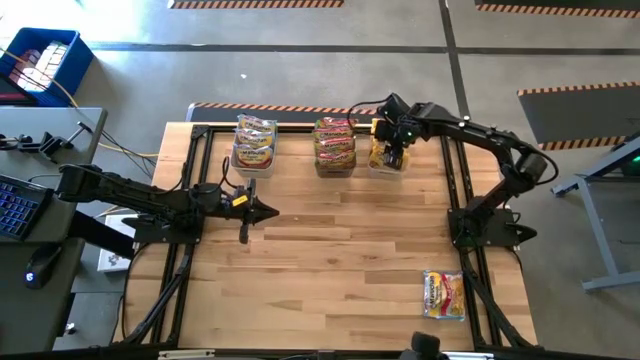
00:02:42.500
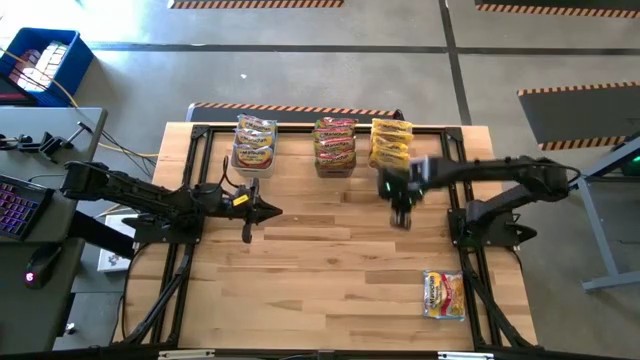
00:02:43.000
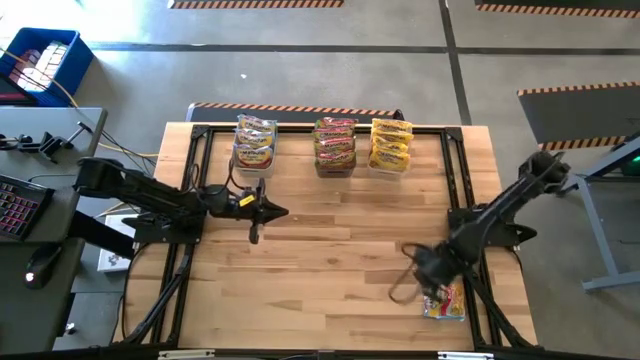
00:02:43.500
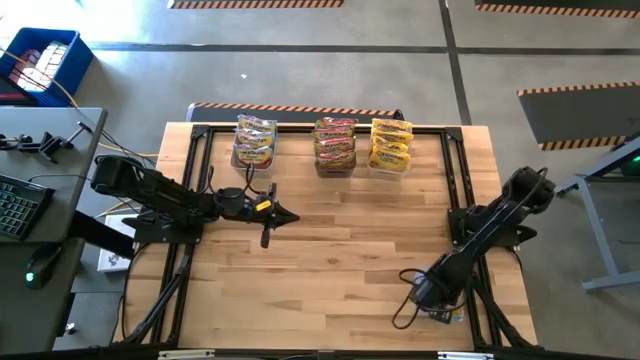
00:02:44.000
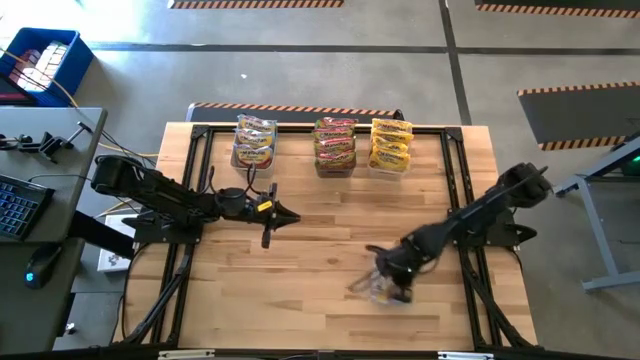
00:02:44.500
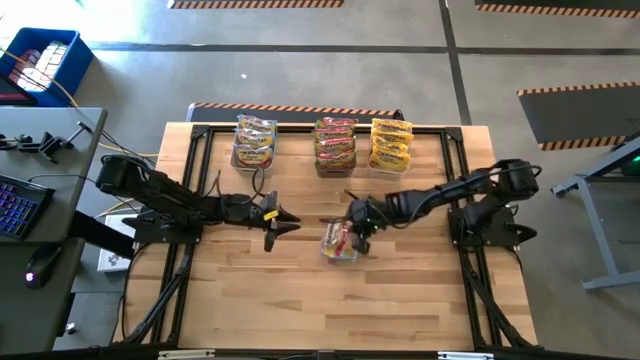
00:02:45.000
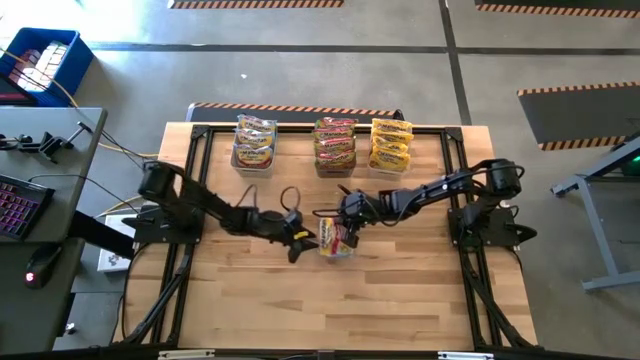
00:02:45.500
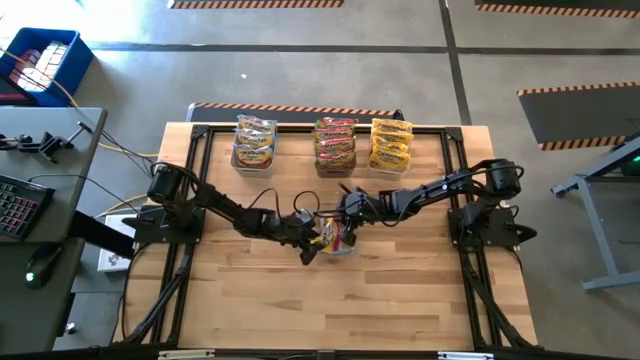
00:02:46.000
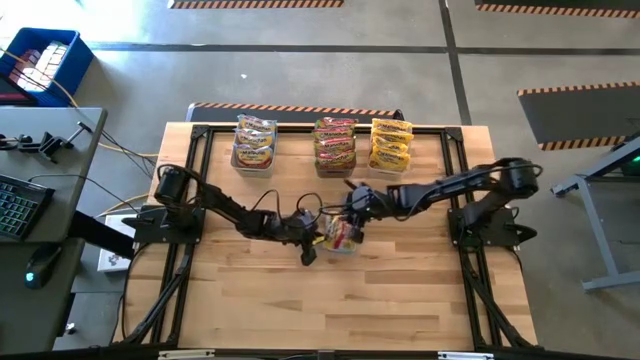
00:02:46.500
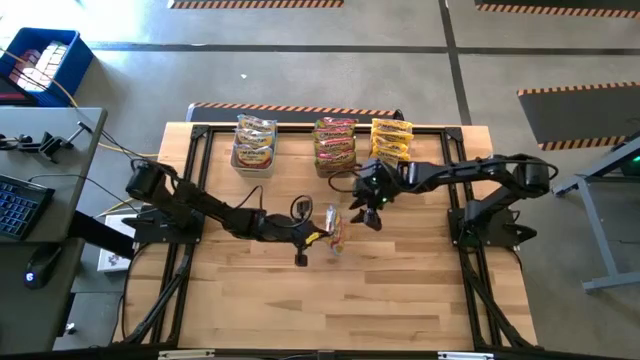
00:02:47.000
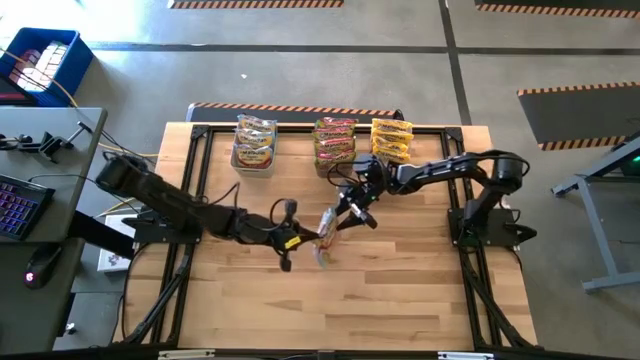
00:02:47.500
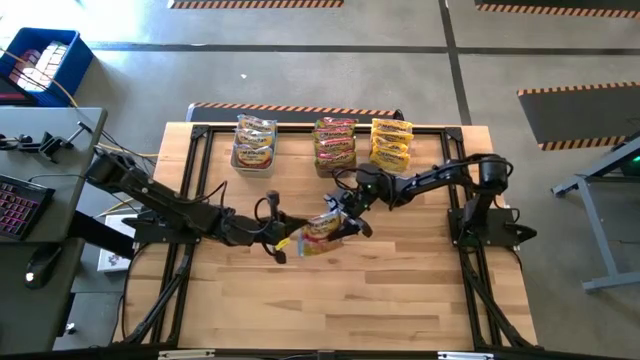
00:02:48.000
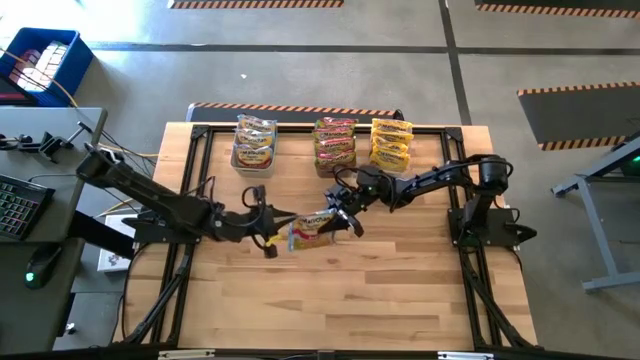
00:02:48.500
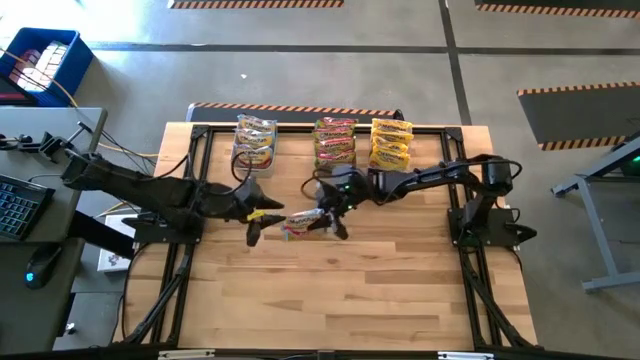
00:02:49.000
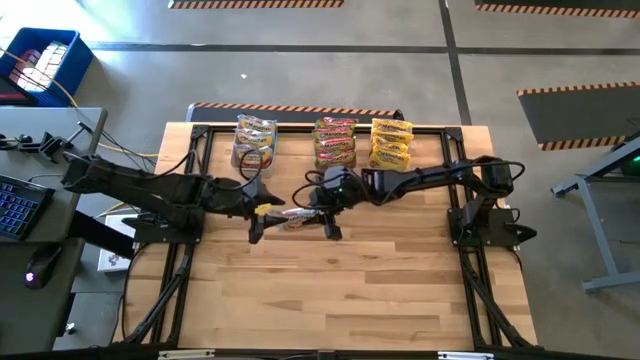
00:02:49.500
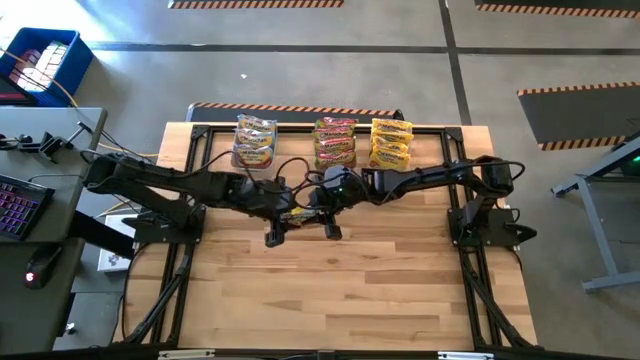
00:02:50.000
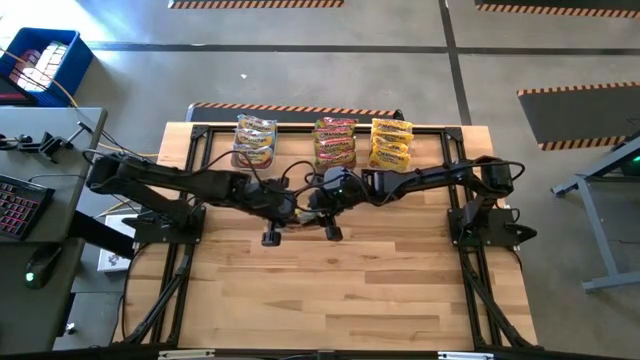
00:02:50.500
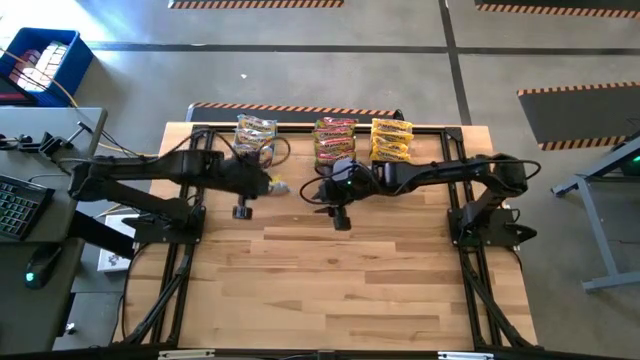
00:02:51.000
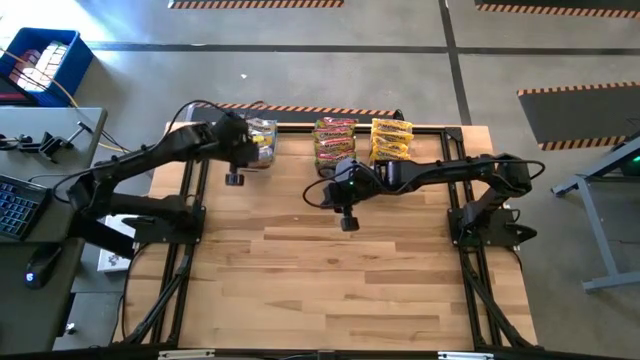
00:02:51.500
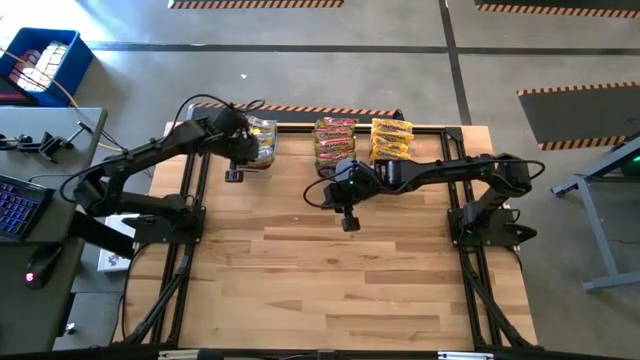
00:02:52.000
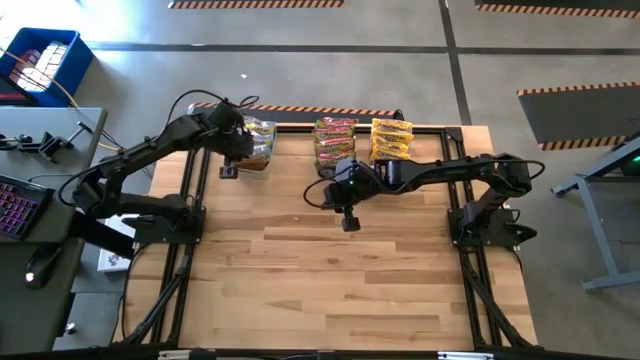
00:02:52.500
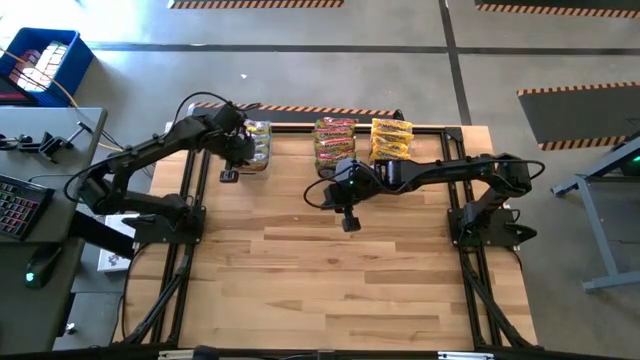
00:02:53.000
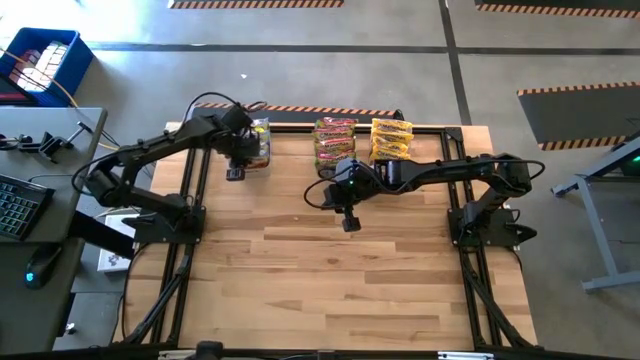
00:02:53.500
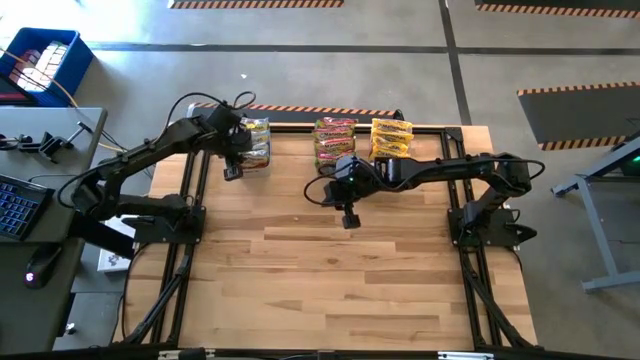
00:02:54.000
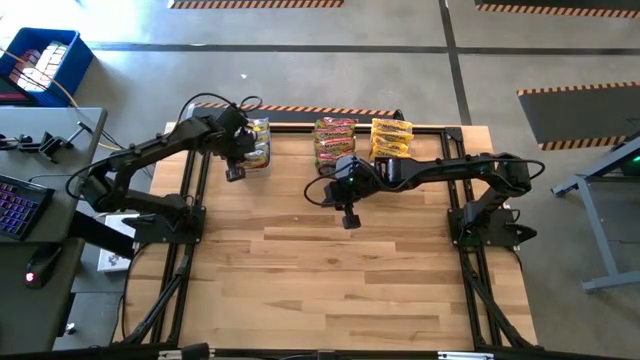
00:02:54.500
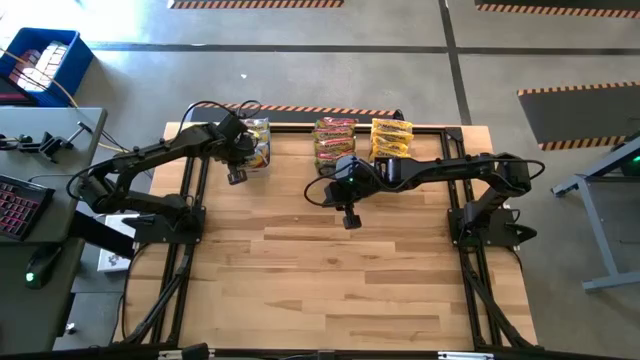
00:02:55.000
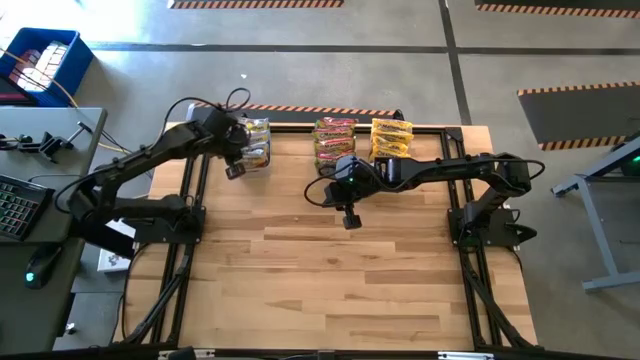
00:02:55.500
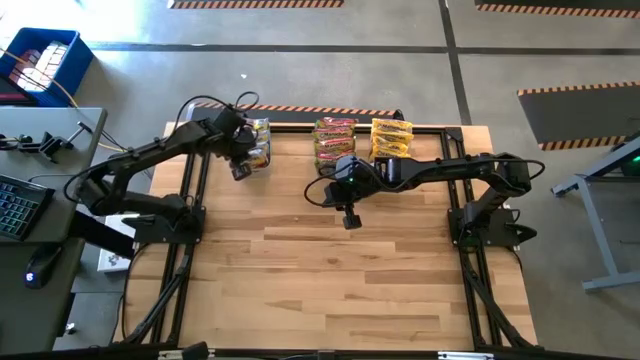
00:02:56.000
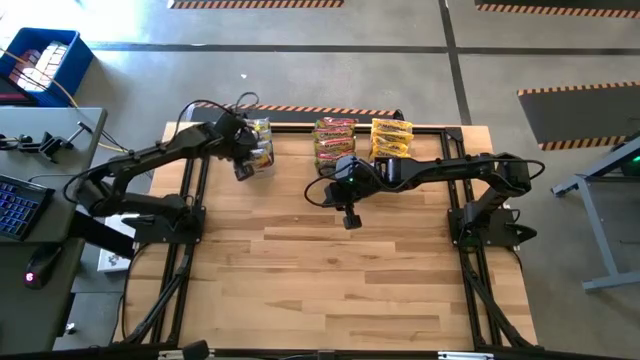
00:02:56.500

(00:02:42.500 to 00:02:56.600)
Task: Sort Maruchan noodles
Put the blue noodle pack into the gray bin

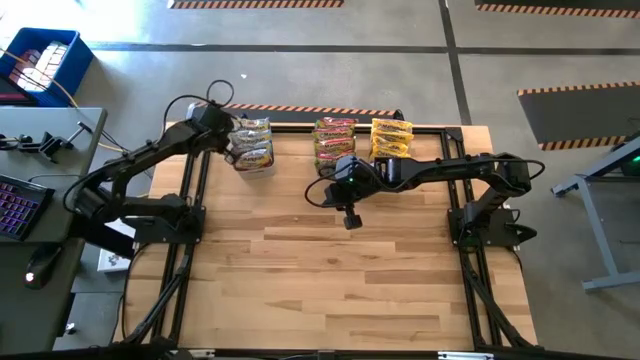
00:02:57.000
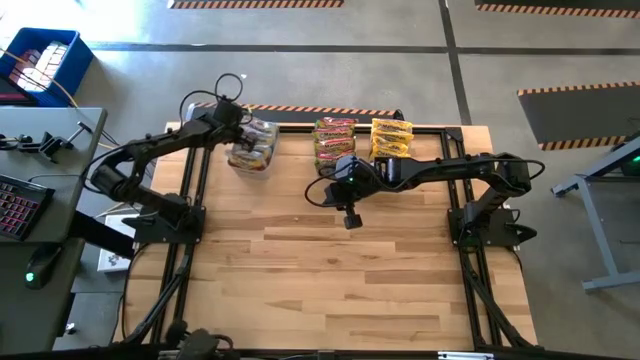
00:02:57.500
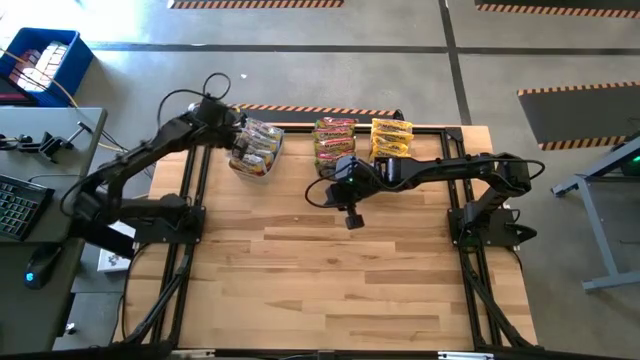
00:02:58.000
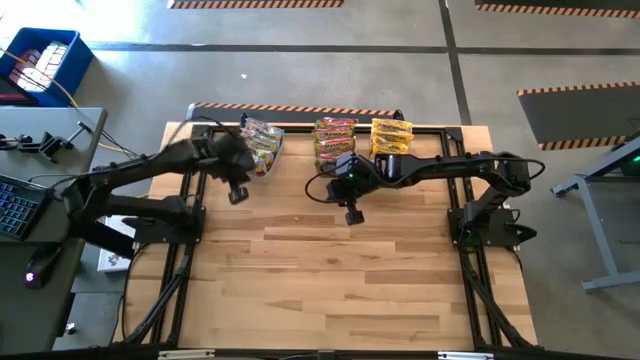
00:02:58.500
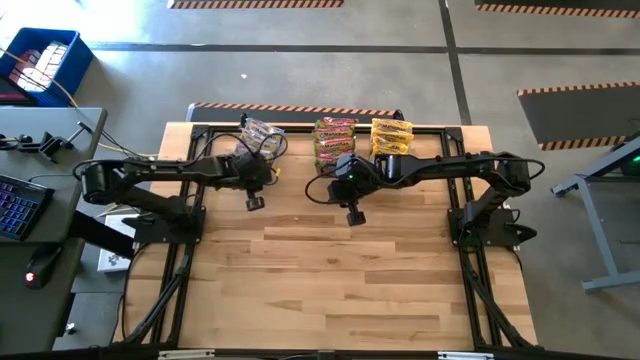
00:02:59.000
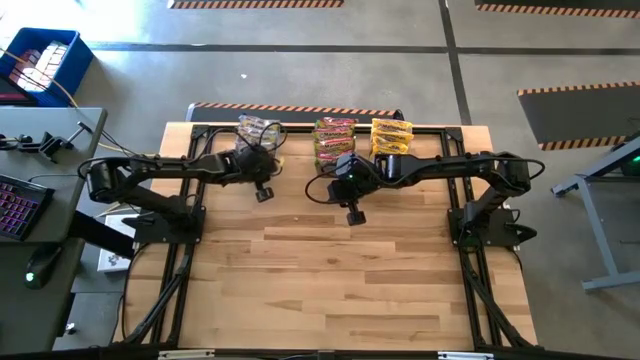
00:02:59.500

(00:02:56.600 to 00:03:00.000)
Adjust the gray bin

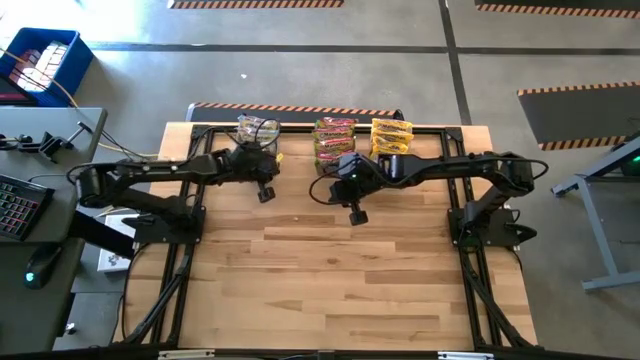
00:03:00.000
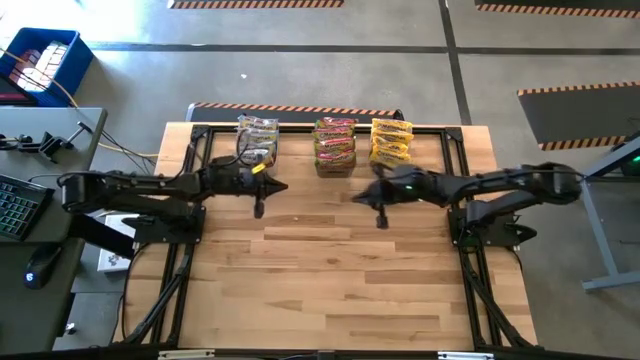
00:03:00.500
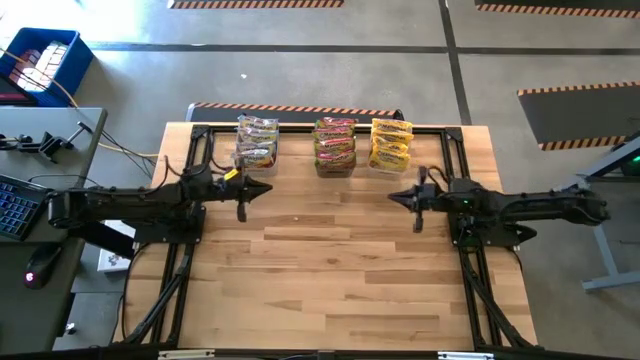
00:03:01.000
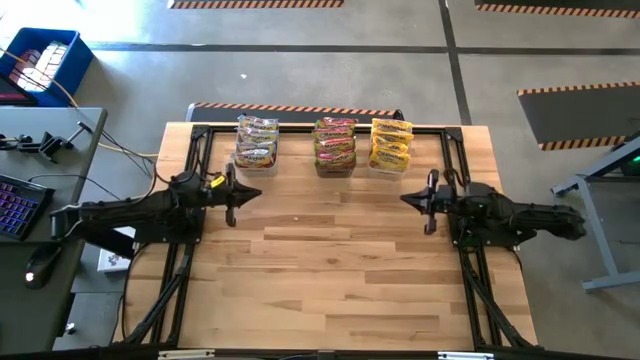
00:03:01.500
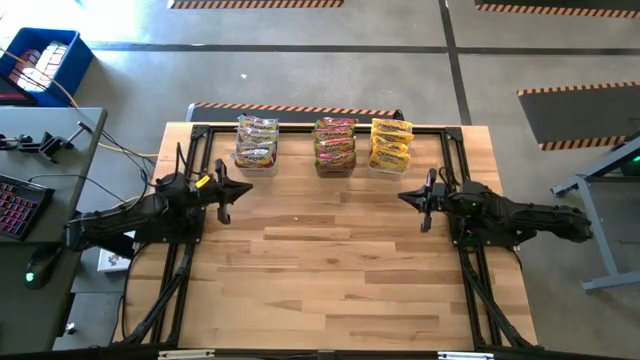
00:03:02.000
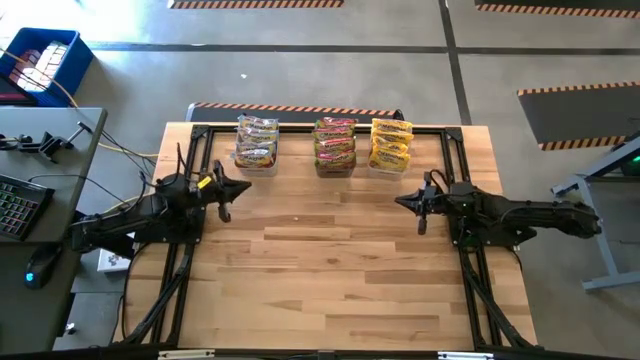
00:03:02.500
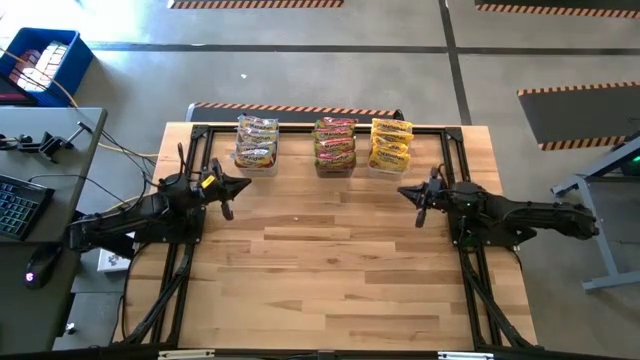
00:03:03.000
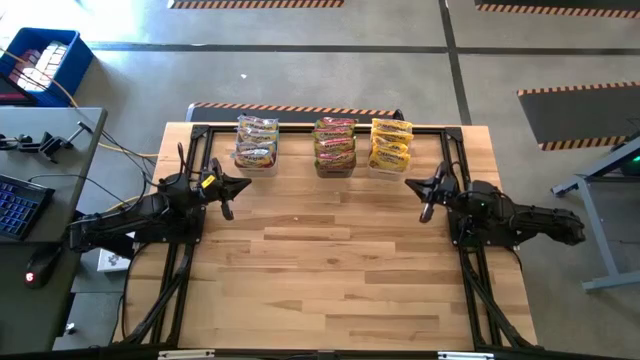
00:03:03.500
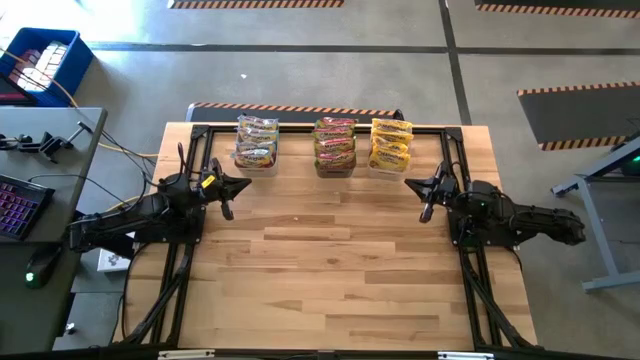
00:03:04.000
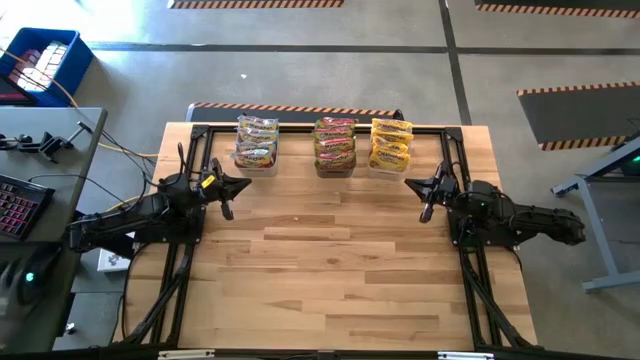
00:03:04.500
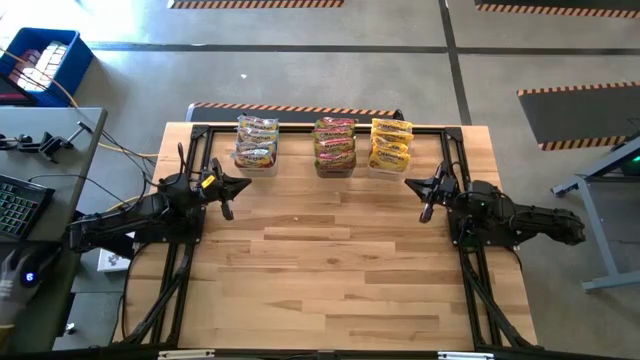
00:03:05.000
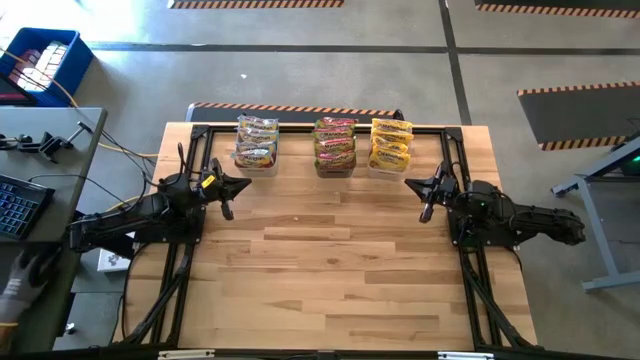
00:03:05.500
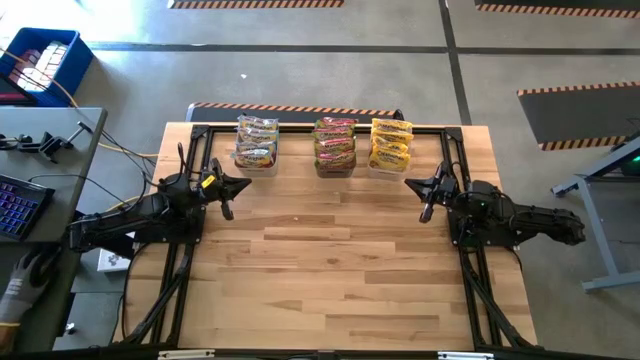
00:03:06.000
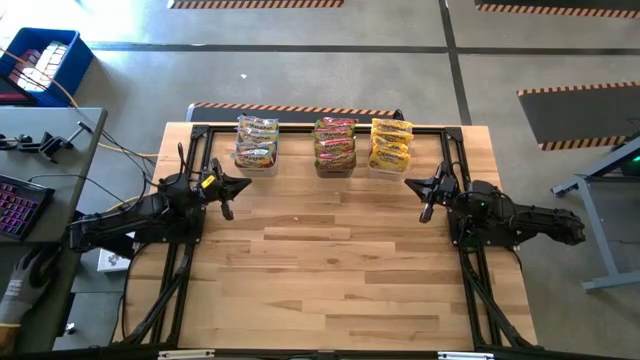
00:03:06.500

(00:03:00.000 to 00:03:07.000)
Return to Home Position
